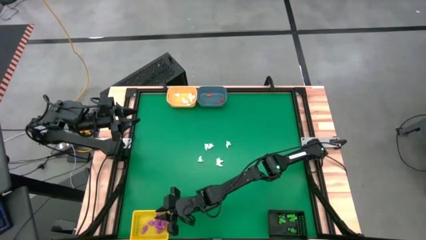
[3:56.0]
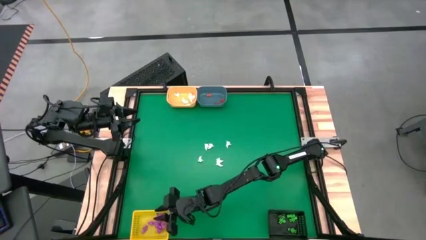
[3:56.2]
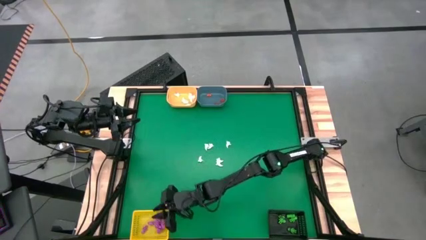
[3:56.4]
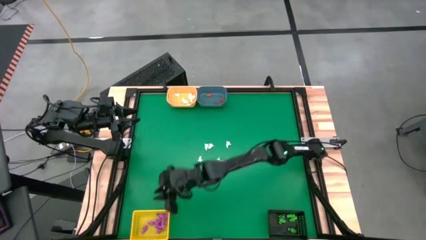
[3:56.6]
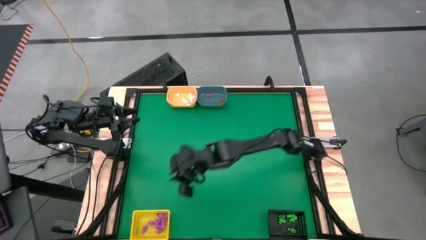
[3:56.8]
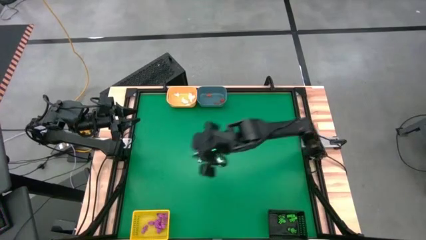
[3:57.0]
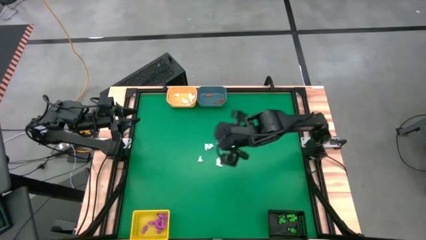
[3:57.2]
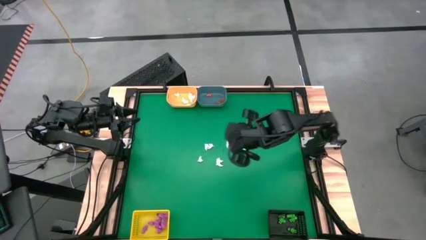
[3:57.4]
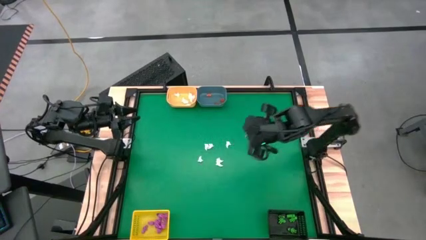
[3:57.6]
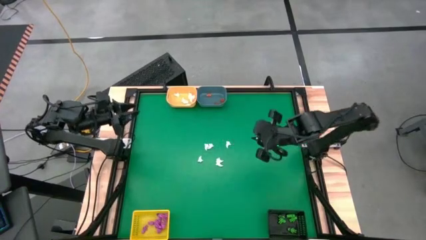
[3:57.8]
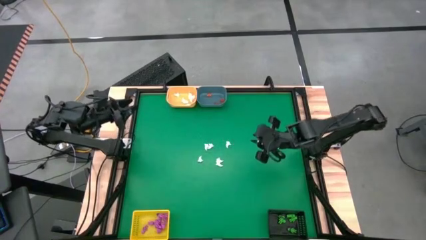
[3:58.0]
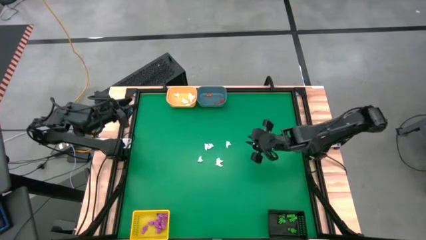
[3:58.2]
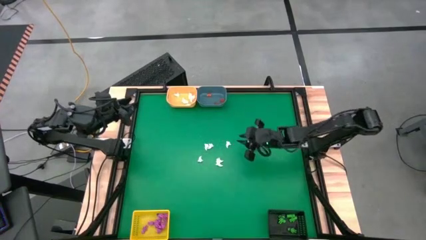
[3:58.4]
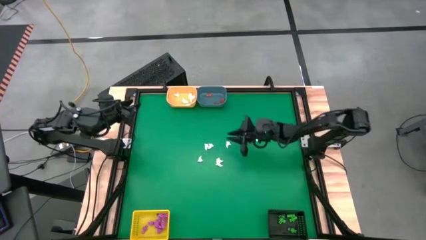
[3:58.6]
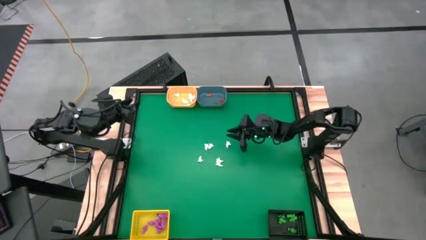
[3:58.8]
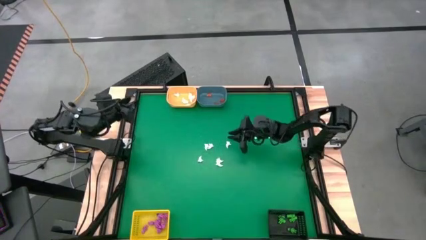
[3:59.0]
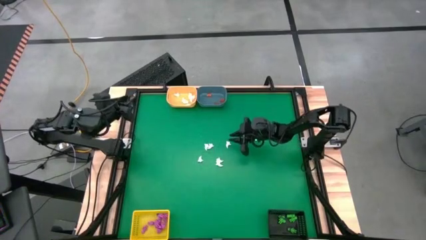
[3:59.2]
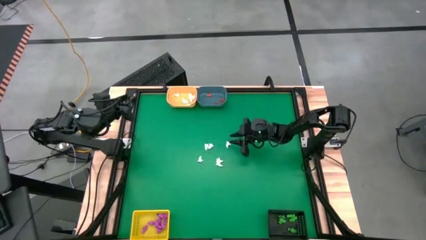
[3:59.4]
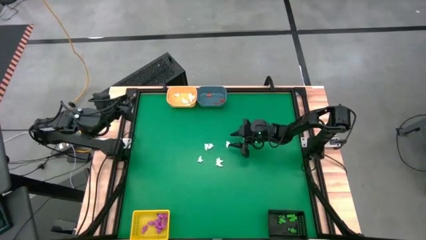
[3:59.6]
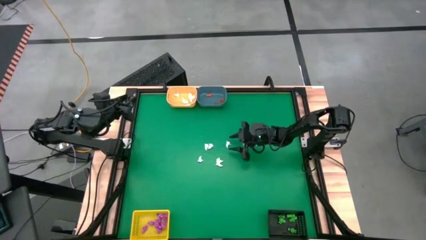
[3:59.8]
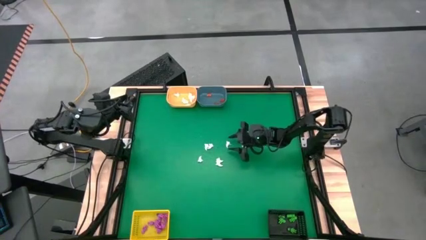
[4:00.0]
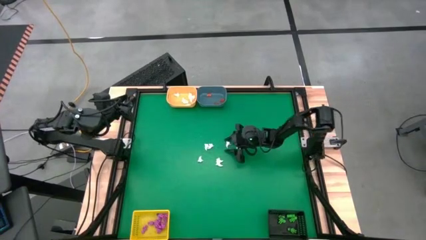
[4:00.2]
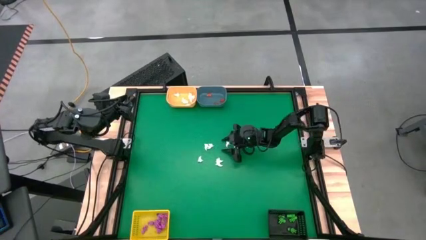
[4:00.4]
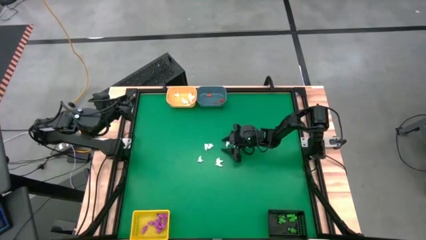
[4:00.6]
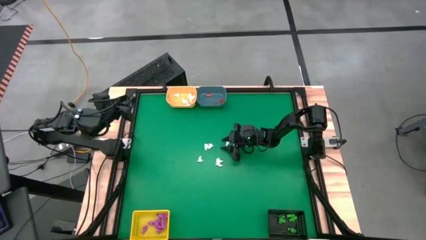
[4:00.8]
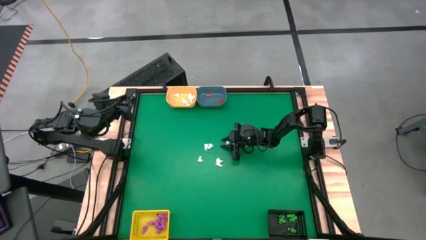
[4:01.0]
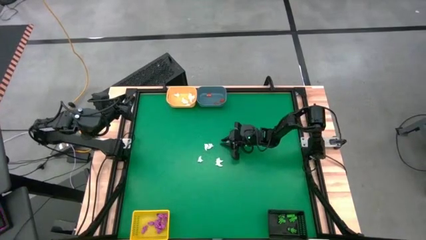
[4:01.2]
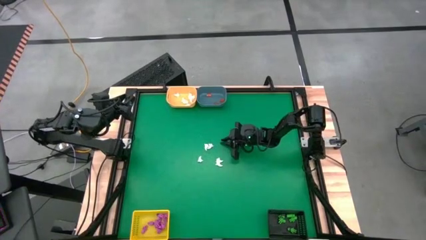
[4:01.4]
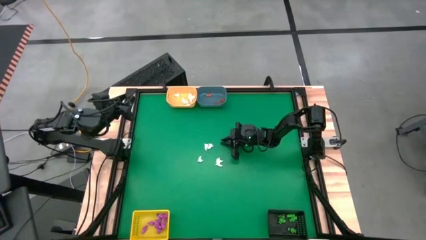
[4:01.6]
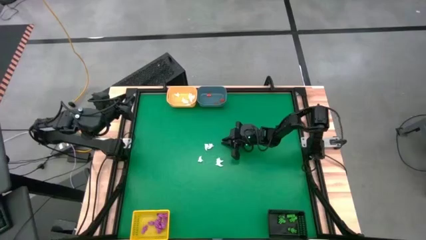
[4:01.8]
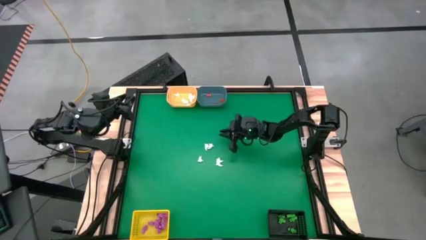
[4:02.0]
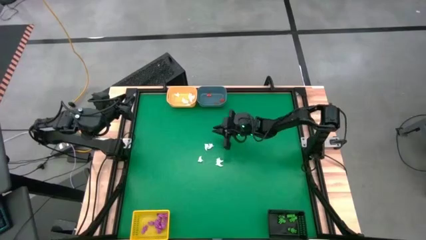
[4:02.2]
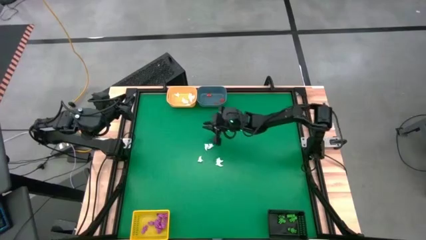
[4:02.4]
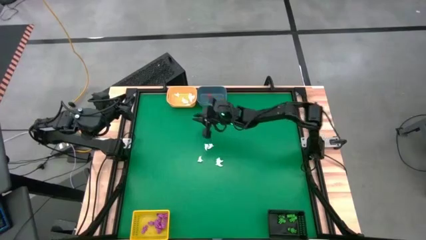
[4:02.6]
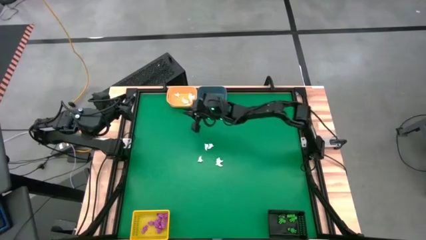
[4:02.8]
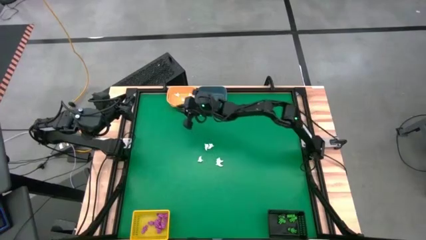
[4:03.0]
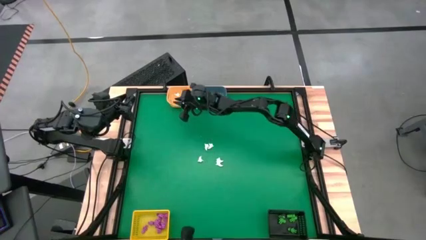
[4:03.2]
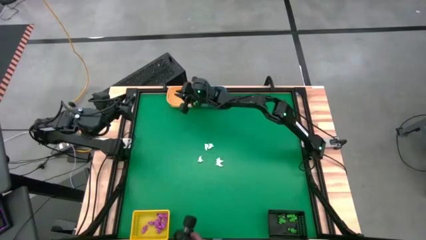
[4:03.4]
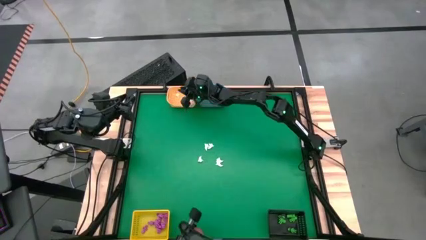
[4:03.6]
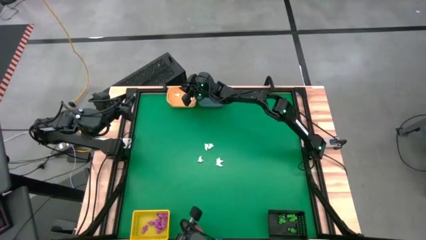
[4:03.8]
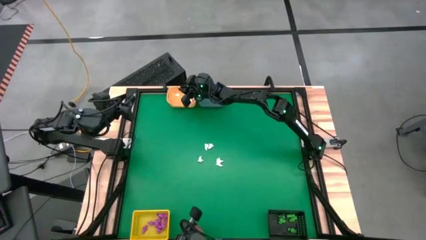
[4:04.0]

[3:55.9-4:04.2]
Task: Sort Halloween decoration
Put the white ghost into the orange bin

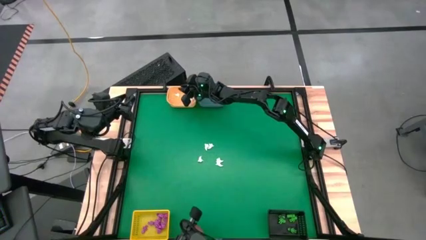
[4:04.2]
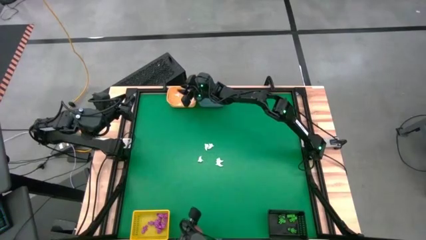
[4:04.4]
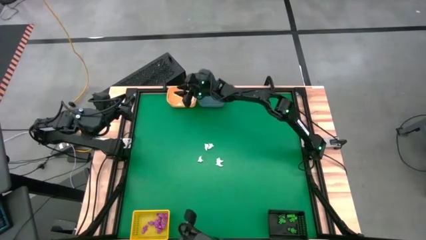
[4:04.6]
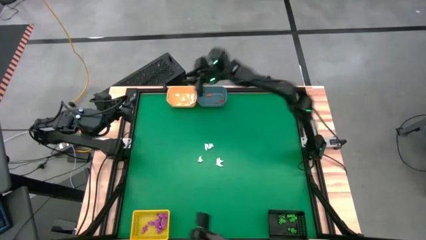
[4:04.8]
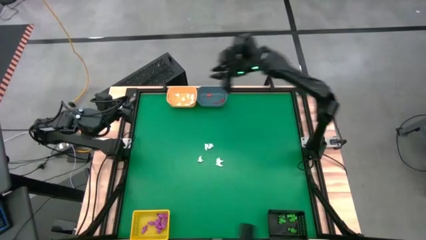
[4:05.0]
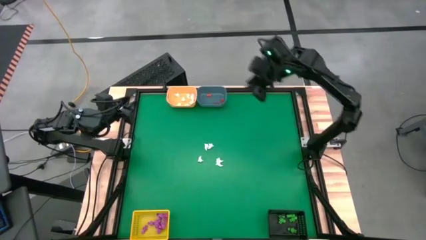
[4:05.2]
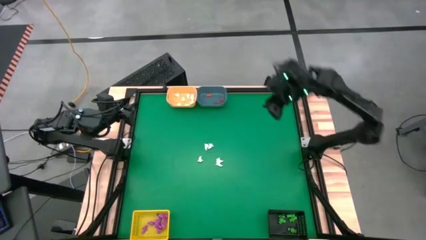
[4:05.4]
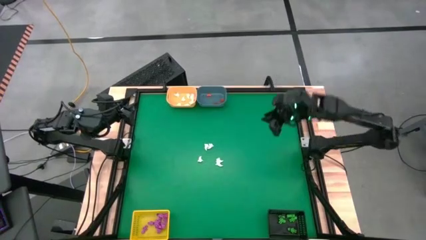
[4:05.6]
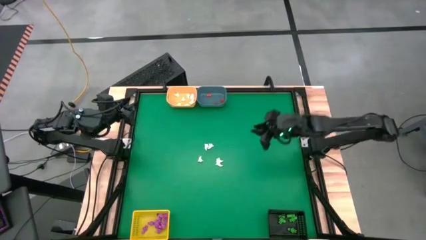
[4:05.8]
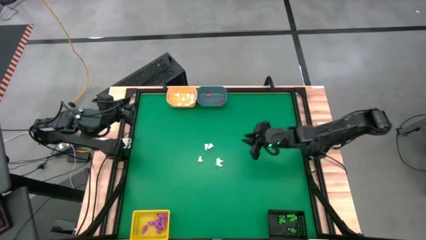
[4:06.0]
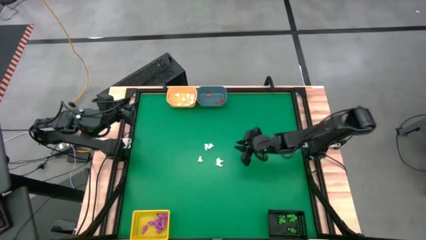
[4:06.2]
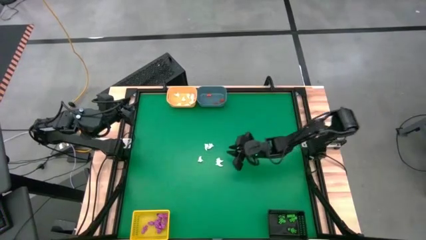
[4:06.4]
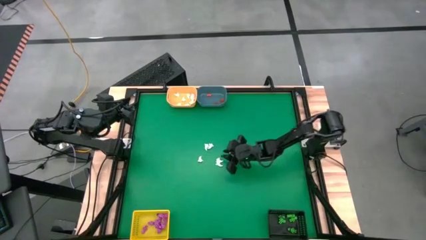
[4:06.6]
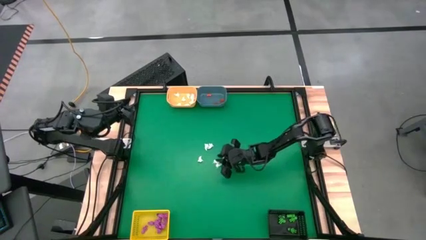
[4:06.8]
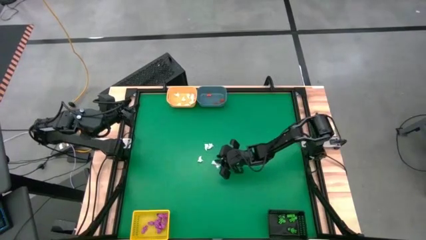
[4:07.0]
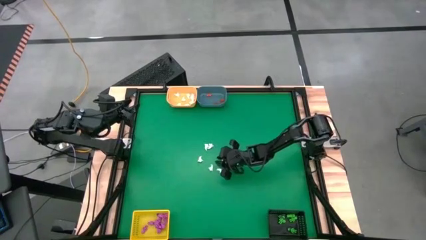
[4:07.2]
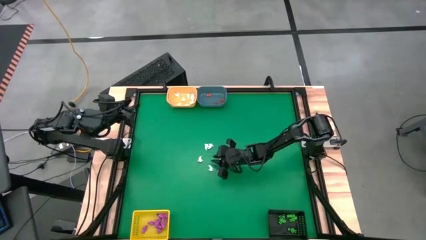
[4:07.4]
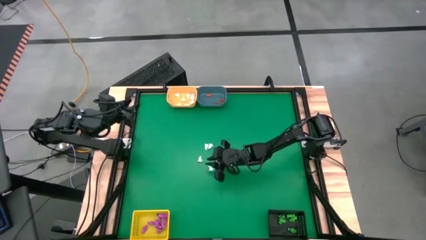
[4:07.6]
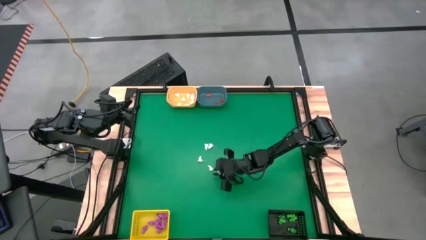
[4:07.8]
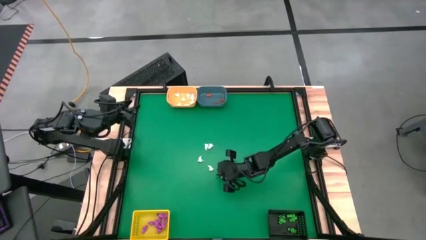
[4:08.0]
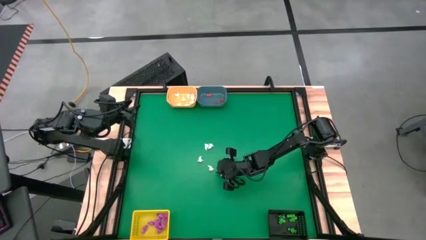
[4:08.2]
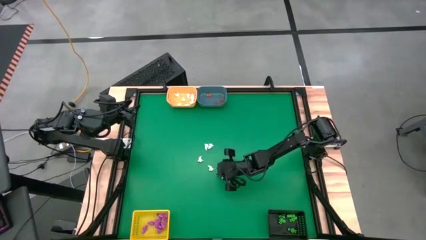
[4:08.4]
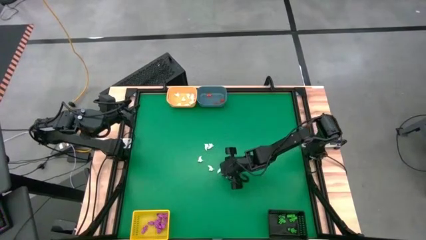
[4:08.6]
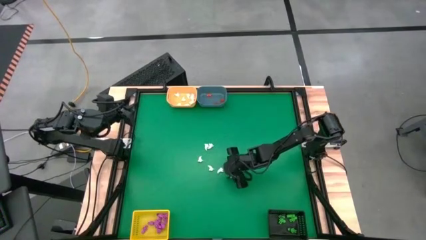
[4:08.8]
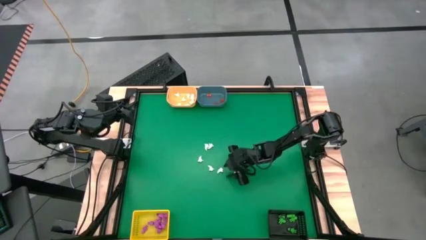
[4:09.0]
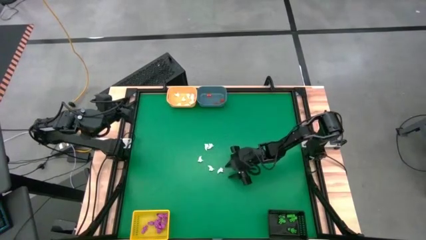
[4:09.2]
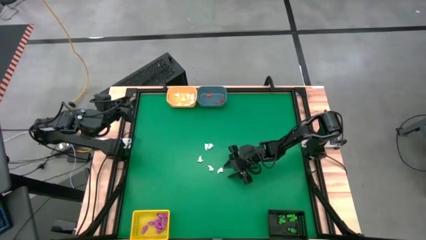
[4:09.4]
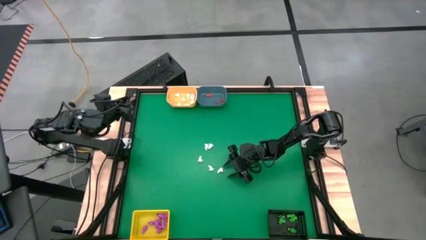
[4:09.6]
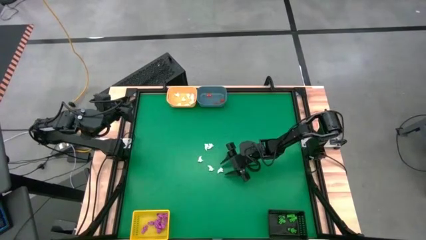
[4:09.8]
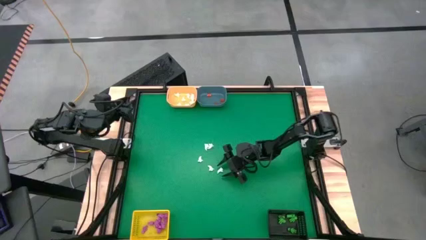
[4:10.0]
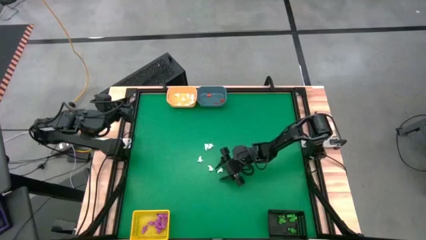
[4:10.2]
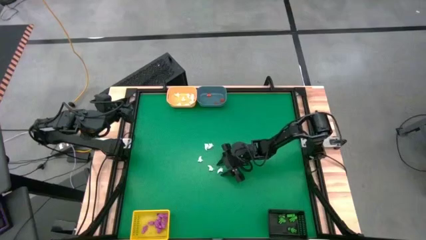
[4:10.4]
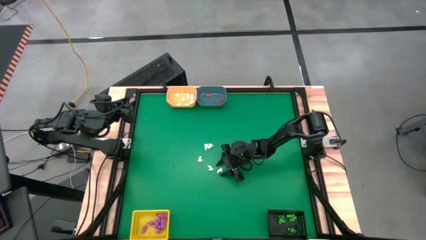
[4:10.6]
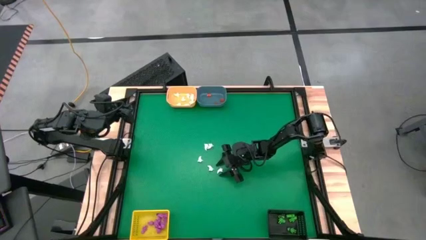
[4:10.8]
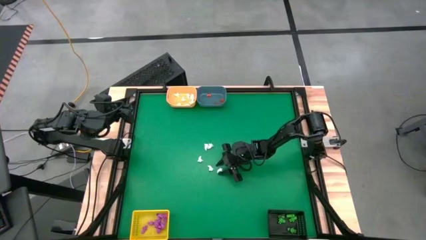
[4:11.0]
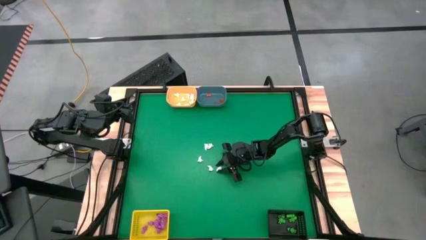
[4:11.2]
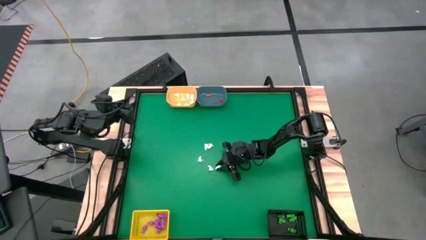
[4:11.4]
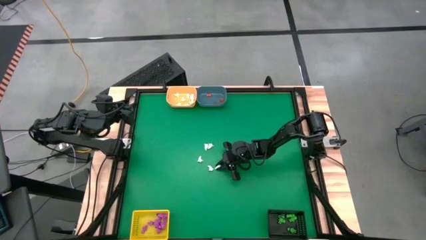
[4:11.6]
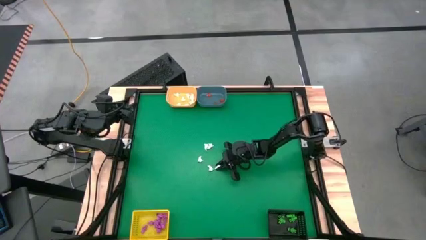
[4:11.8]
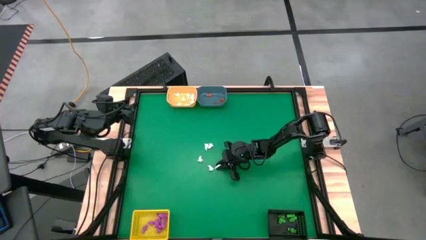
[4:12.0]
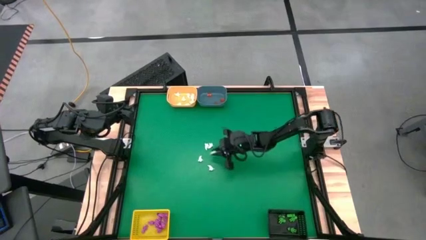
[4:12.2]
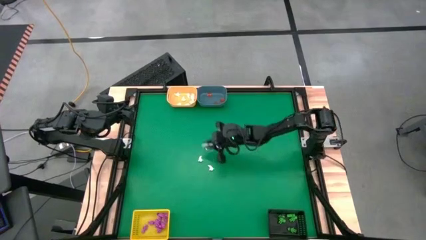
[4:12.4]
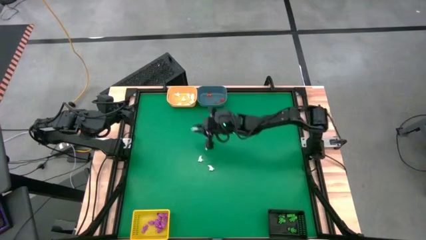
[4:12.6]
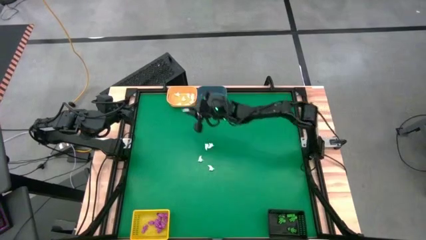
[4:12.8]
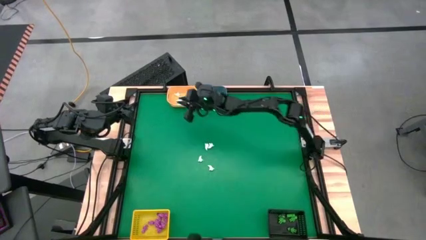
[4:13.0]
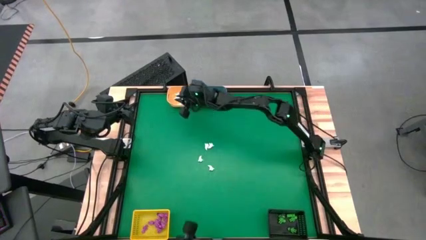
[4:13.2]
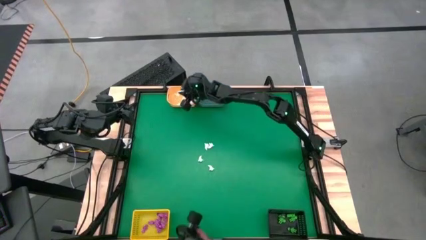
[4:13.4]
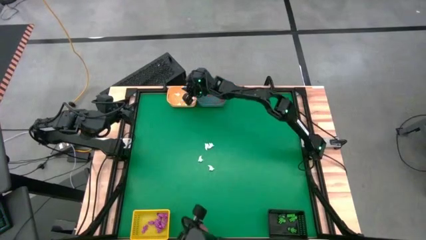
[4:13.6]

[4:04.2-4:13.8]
Put the white ghost into the orange bin
